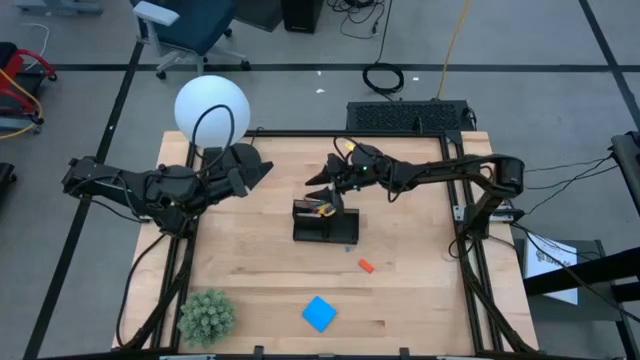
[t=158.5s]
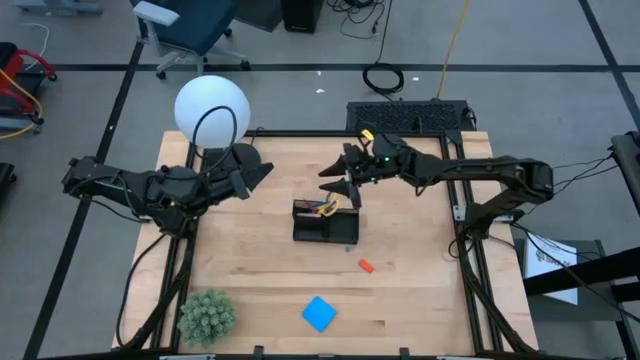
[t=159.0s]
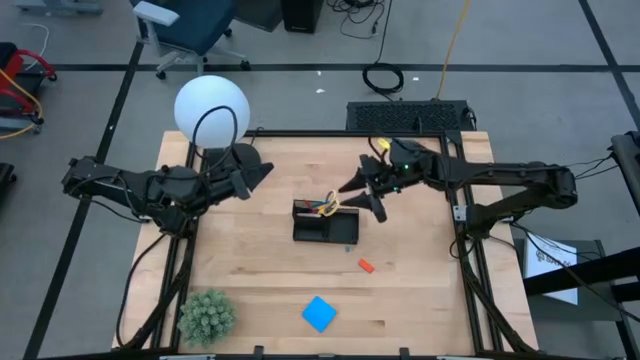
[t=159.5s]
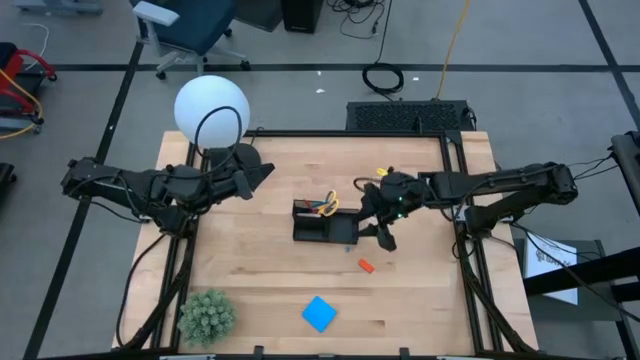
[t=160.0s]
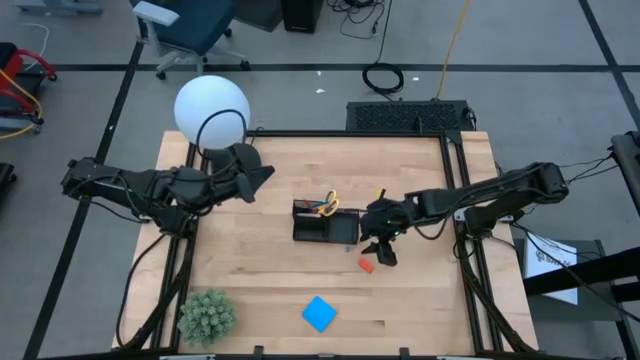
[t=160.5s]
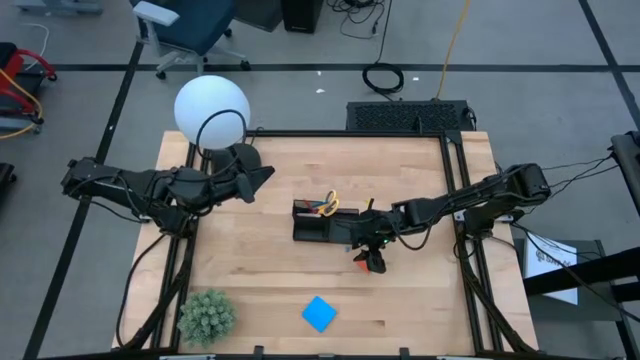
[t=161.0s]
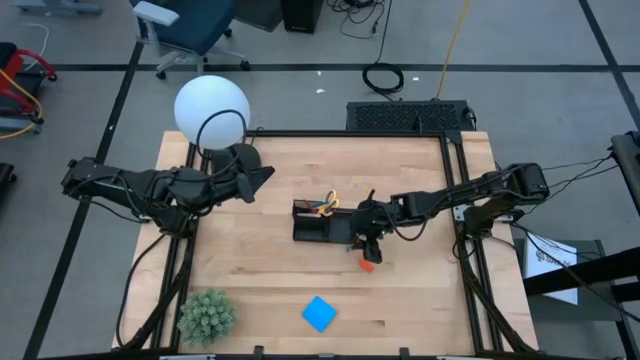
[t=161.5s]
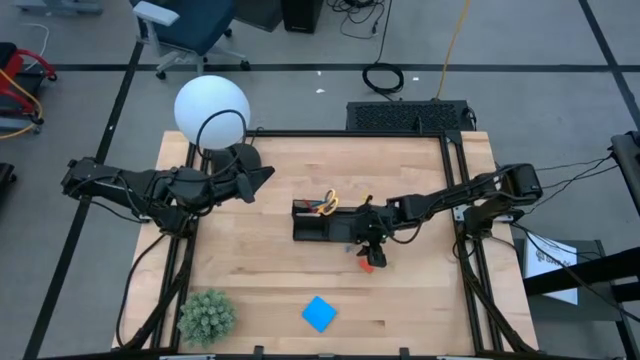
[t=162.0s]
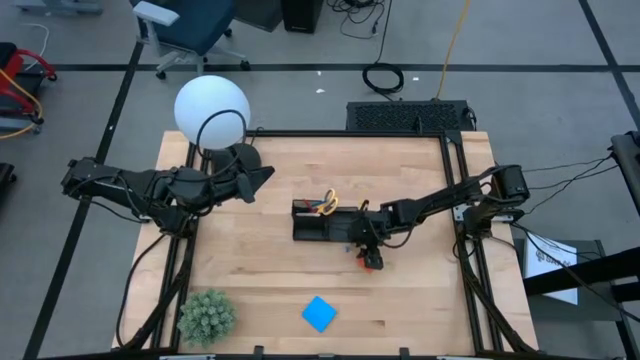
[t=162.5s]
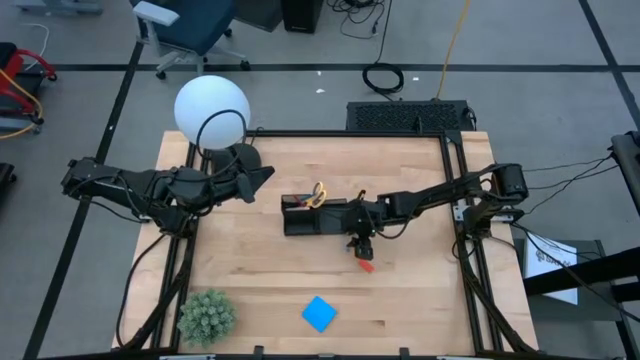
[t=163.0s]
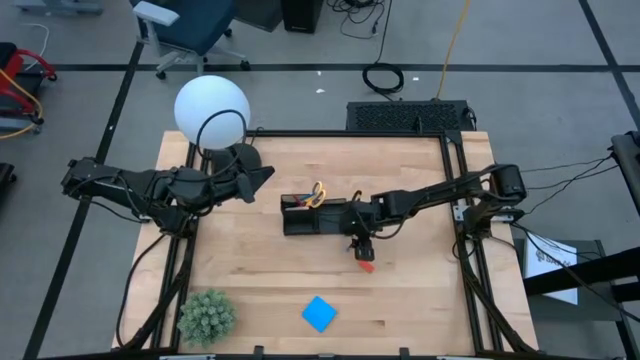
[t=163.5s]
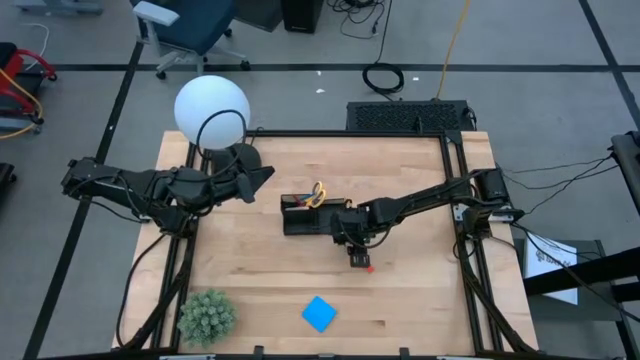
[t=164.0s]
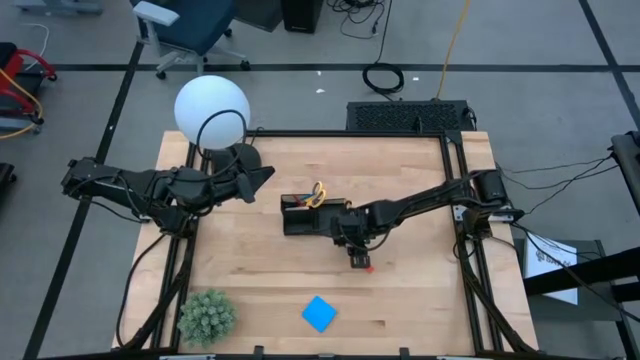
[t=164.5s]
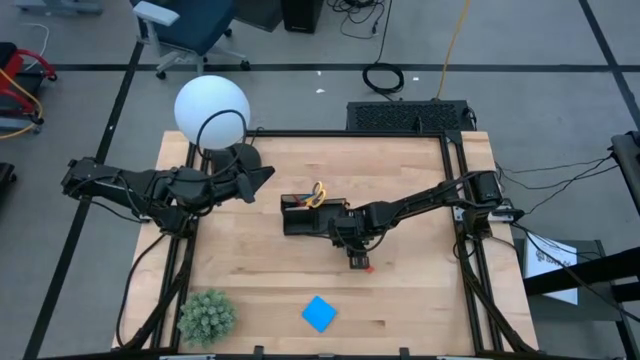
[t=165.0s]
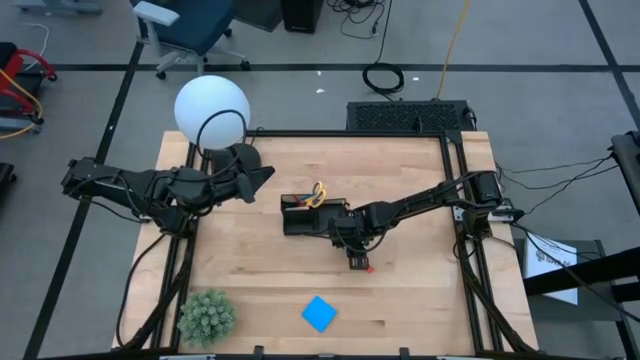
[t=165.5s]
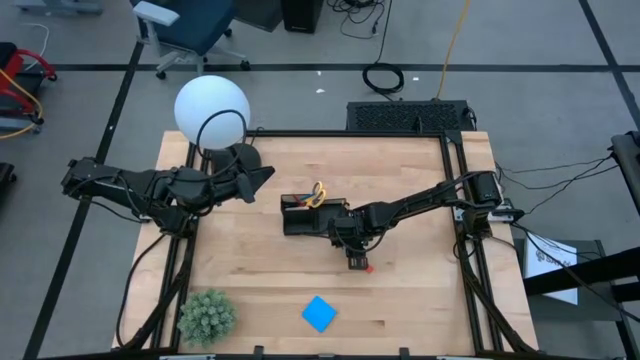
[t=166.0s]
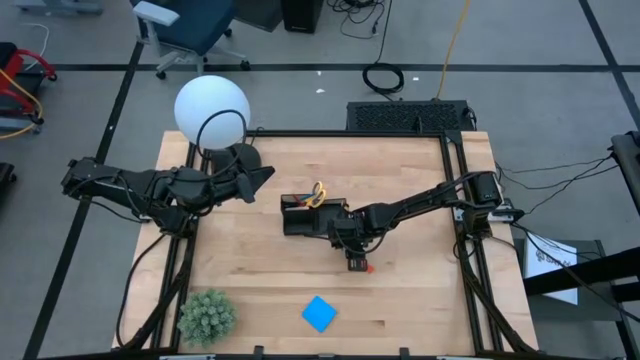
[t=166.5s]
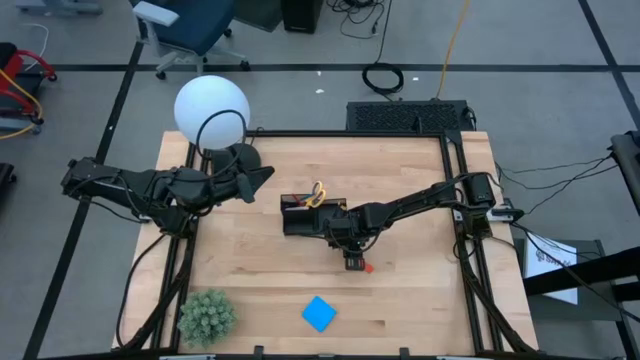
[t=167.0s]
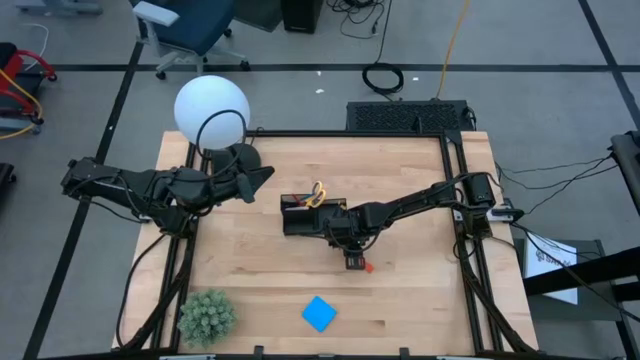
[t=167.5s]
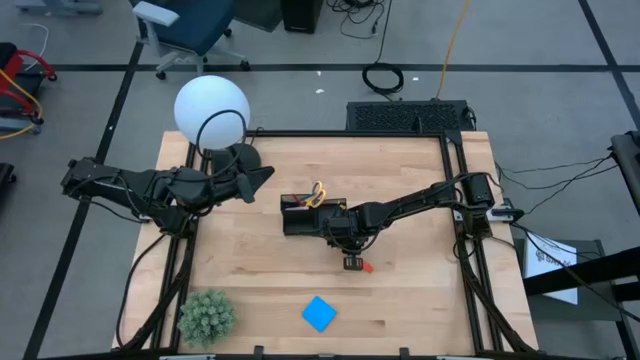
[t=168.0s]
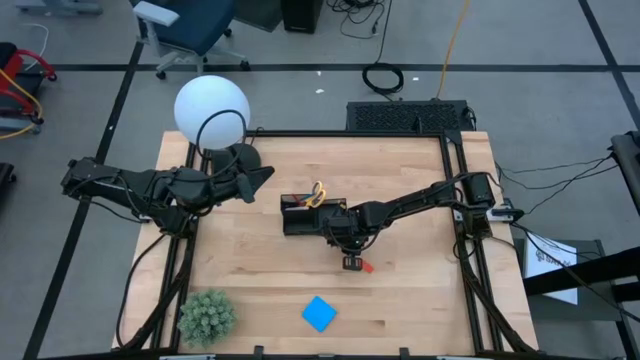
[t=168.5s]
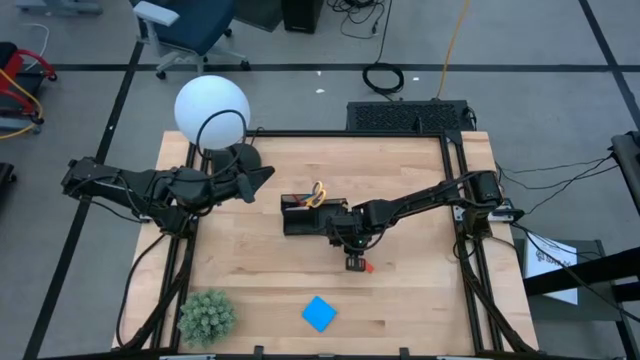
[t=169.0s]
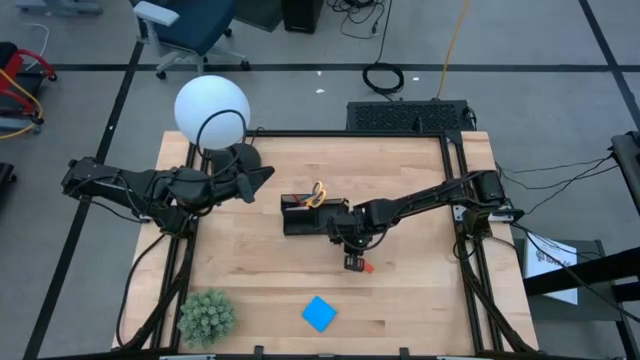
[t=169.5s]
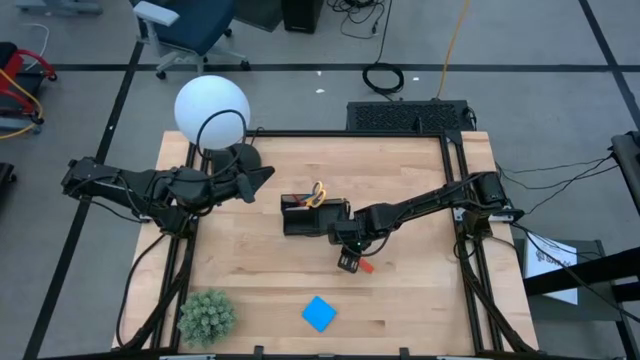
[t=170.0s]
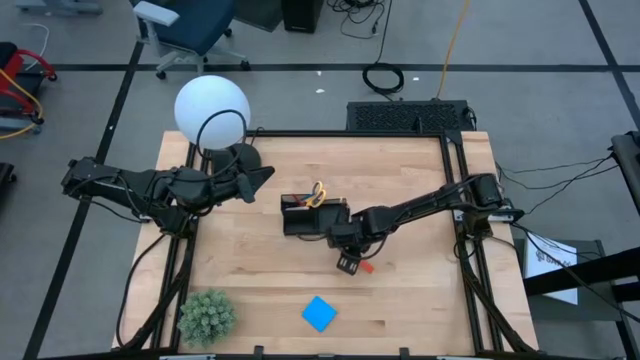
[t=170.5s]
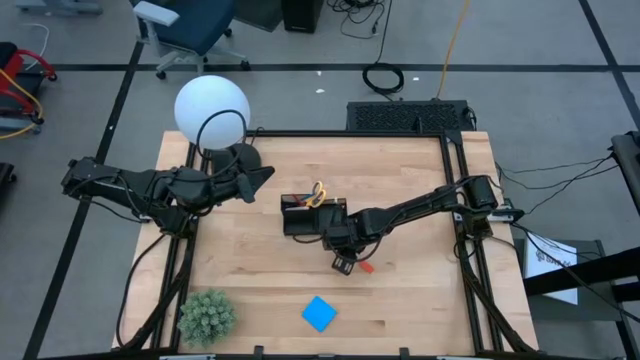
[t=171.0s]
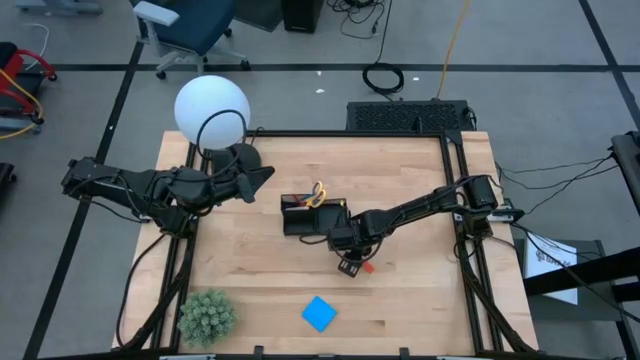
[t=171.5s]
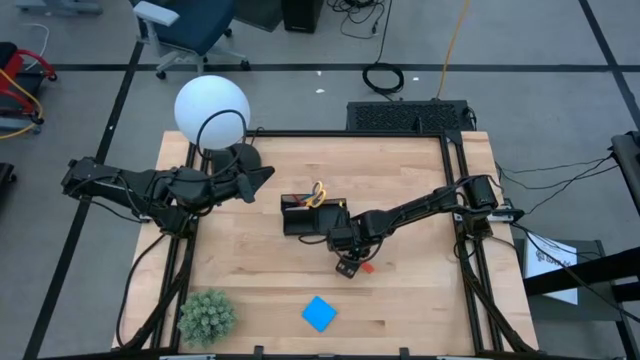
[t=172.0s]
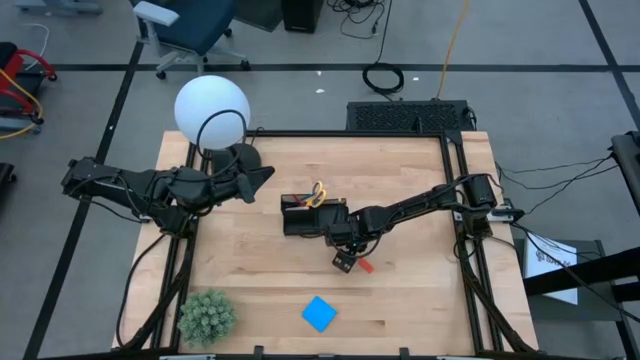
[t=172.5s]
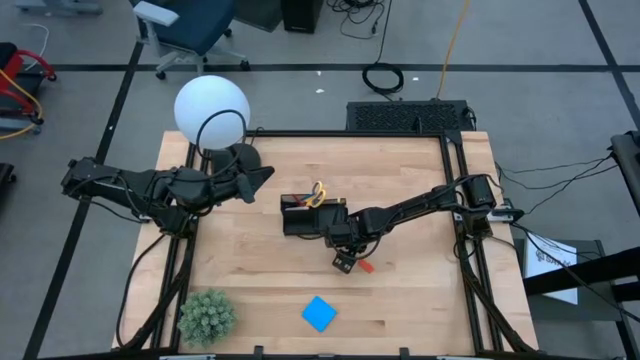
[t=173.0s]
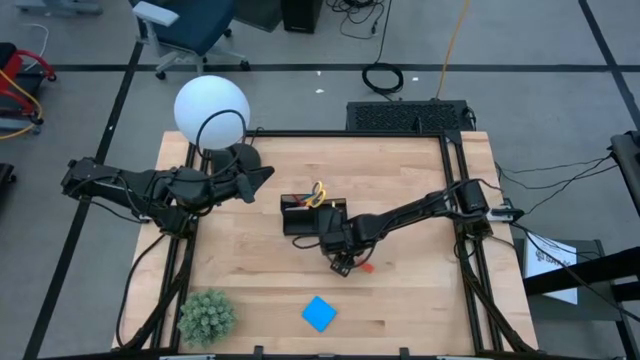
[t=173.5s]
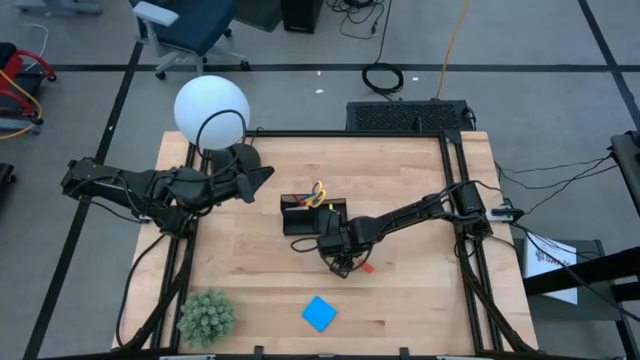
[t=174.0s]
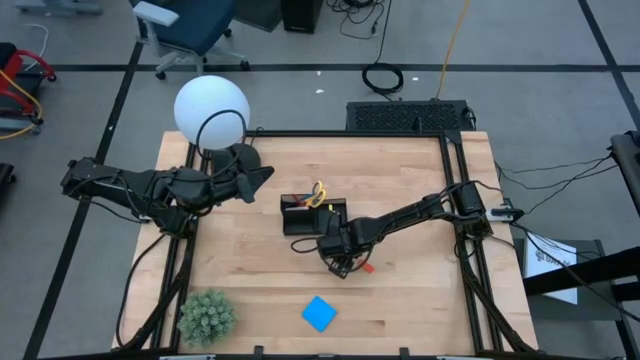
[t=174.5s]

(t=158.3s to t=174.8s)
Task: Pick and place office supplies into organizer
Put the blue binder clip into the desk organizer

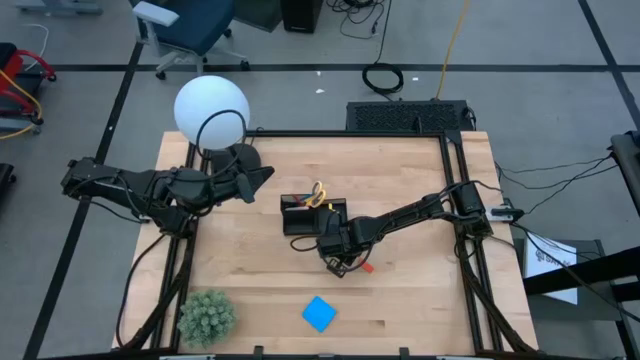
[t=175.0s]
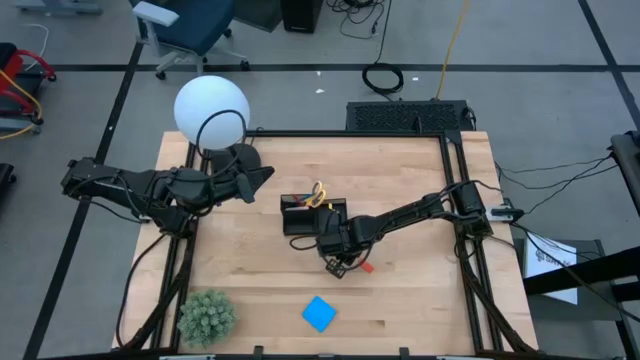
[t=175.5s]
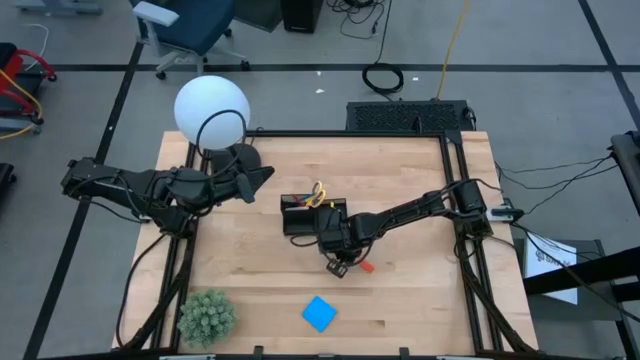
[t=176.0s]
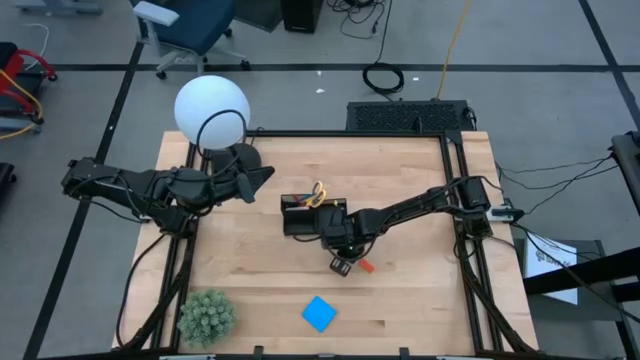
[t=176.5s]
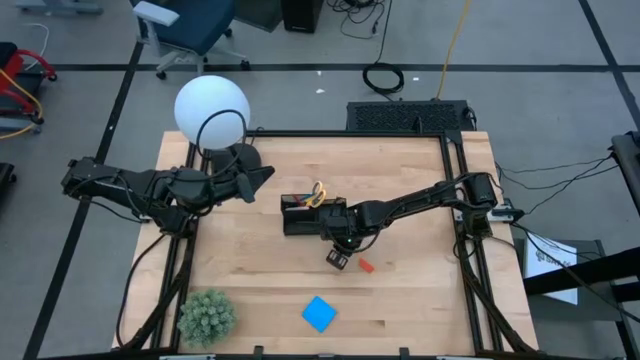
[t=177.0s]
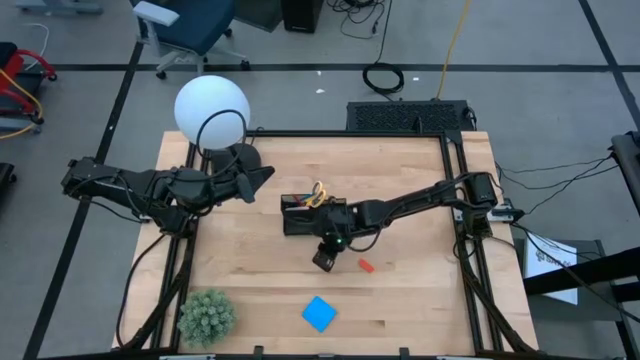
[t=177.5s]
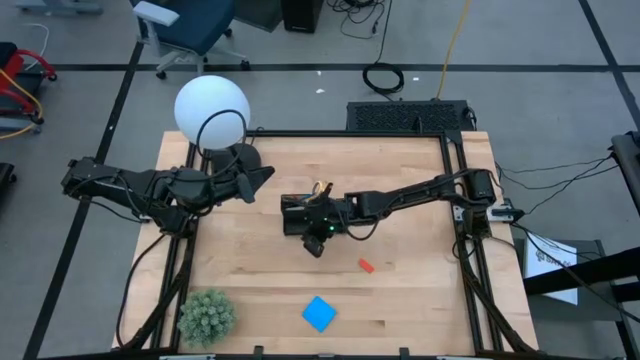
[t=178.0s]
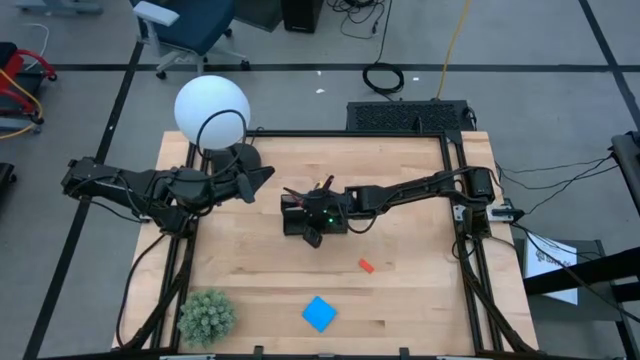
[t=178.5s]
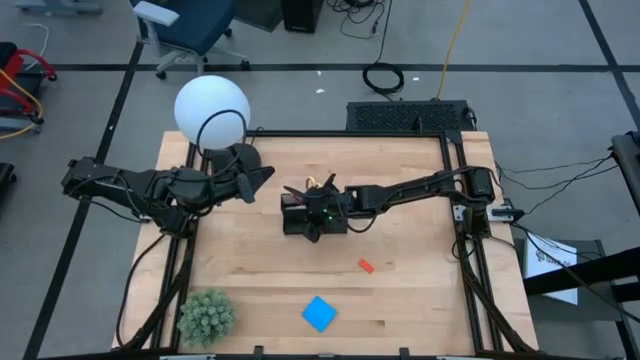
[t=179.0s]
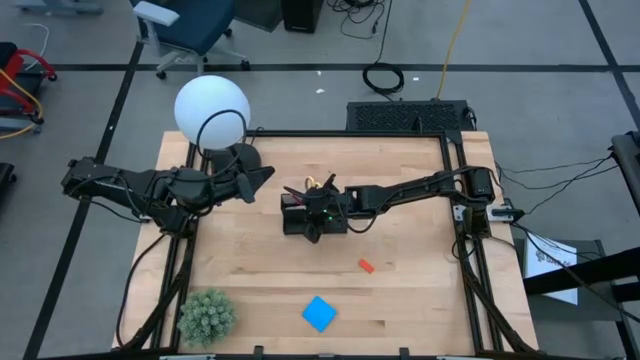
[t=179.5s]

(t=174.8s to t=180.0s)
Put the blue binder clip into the desk organizer
